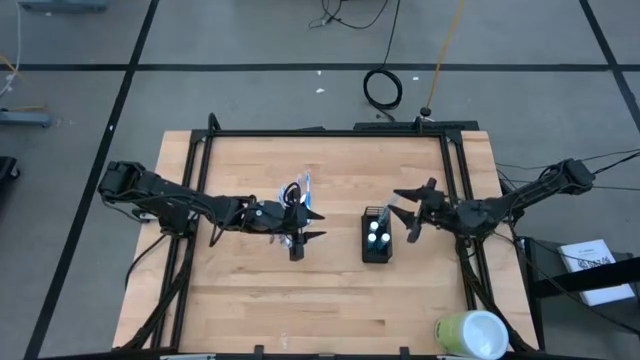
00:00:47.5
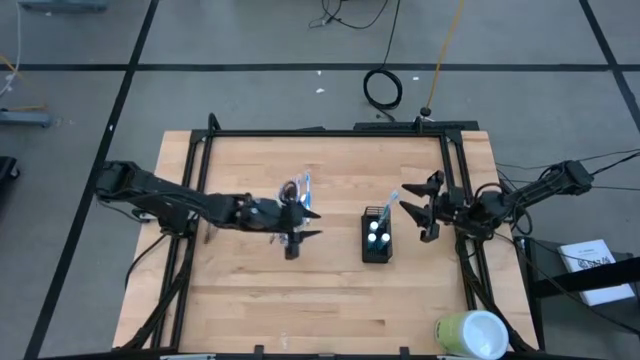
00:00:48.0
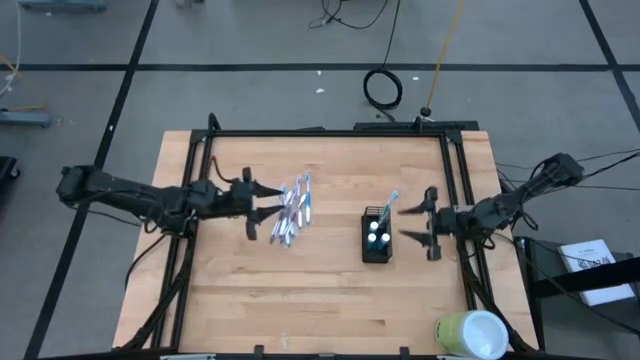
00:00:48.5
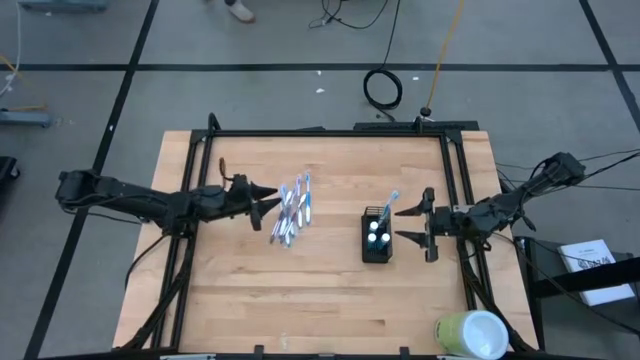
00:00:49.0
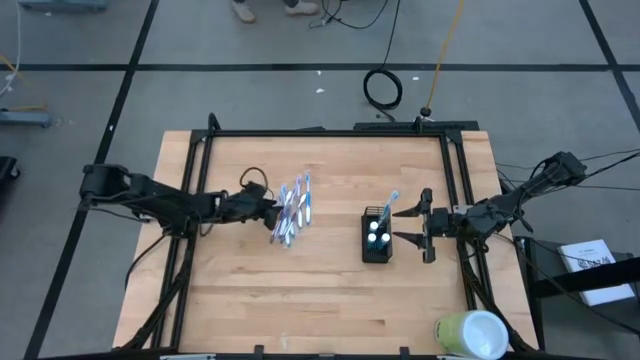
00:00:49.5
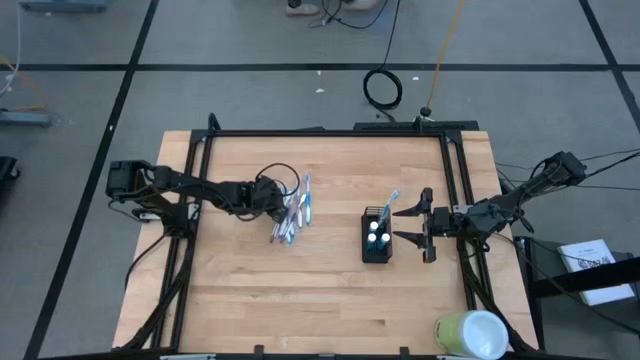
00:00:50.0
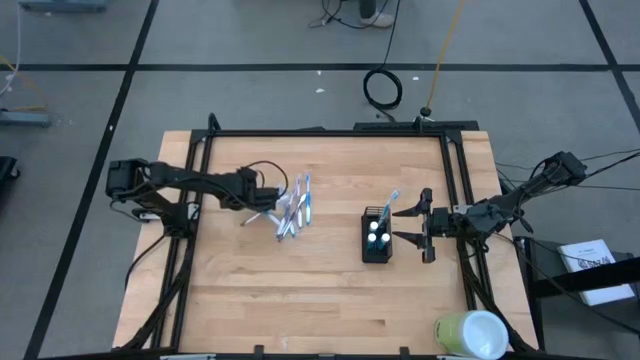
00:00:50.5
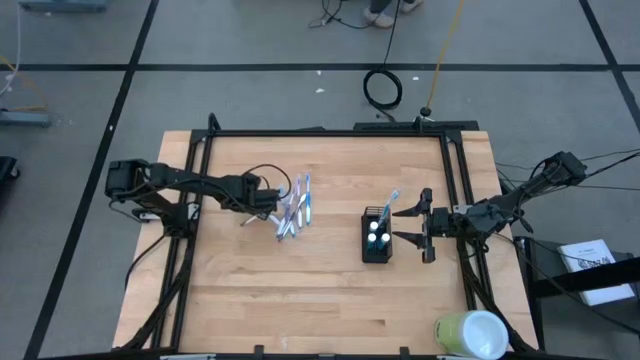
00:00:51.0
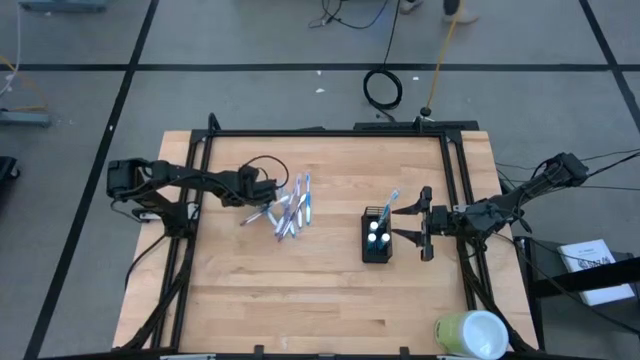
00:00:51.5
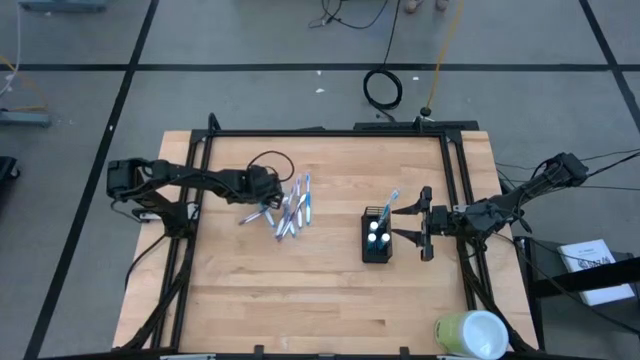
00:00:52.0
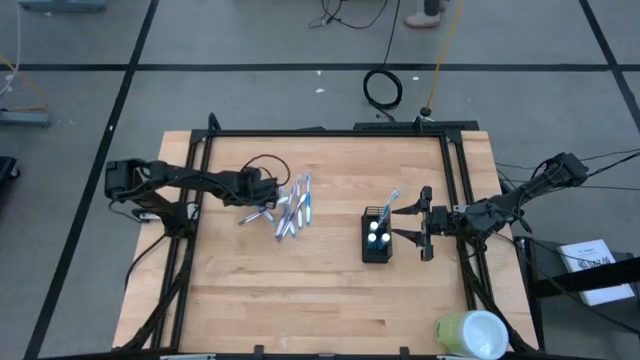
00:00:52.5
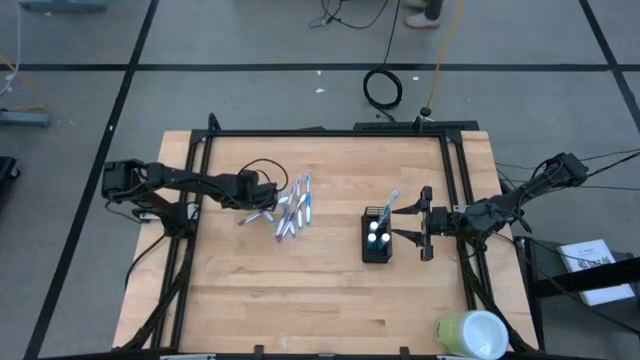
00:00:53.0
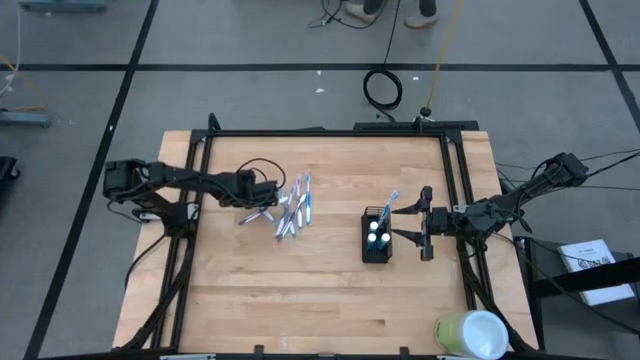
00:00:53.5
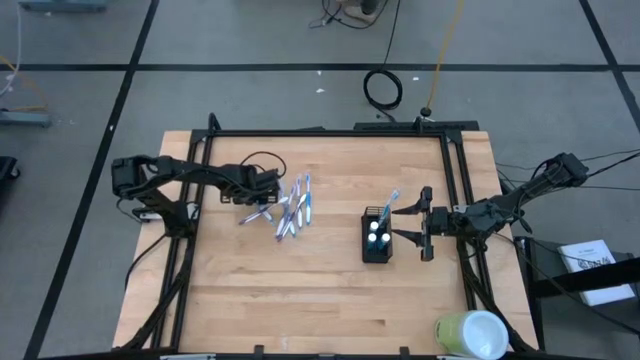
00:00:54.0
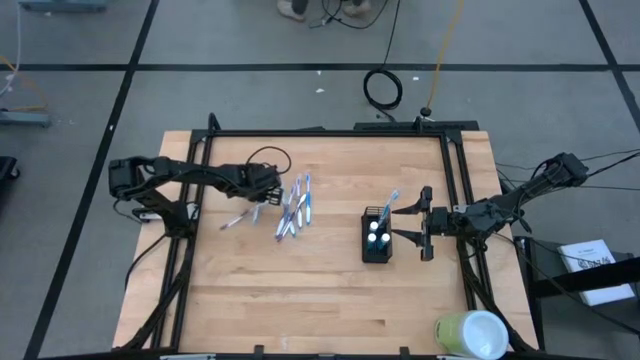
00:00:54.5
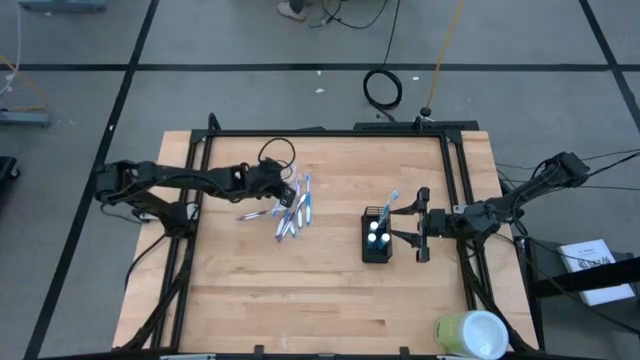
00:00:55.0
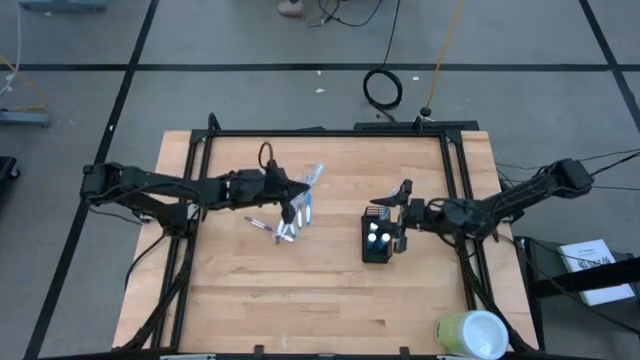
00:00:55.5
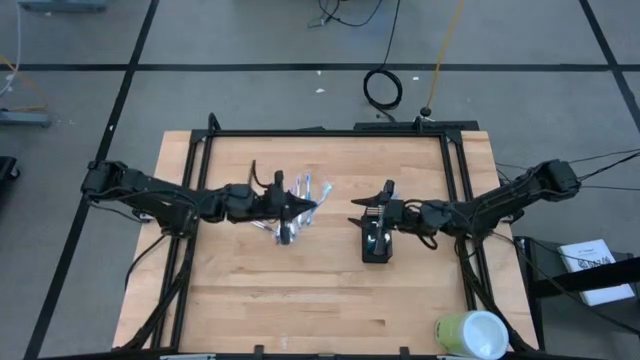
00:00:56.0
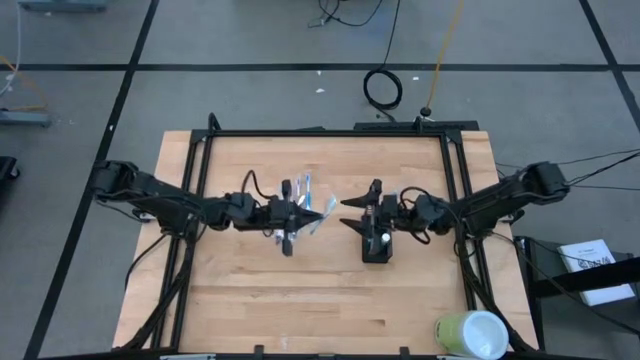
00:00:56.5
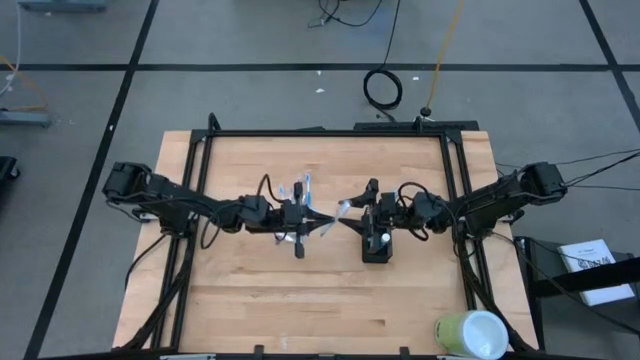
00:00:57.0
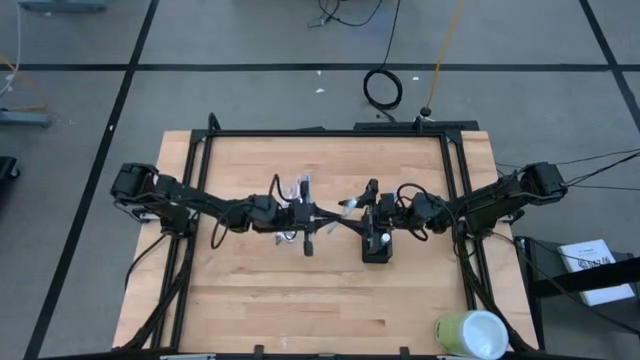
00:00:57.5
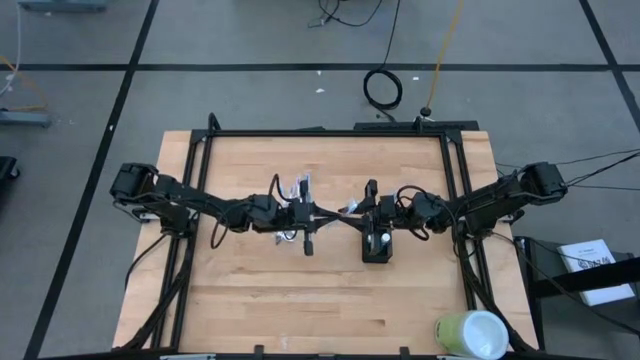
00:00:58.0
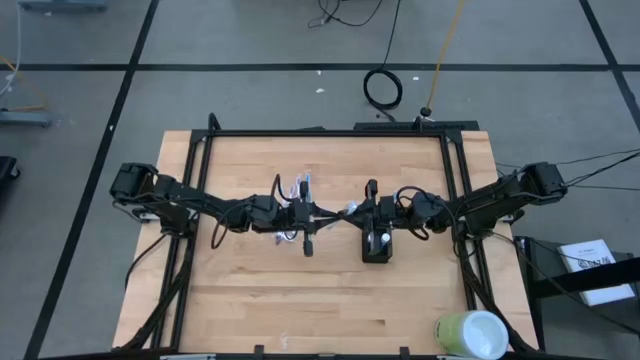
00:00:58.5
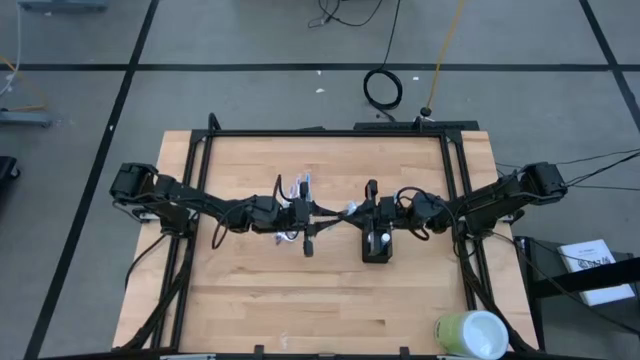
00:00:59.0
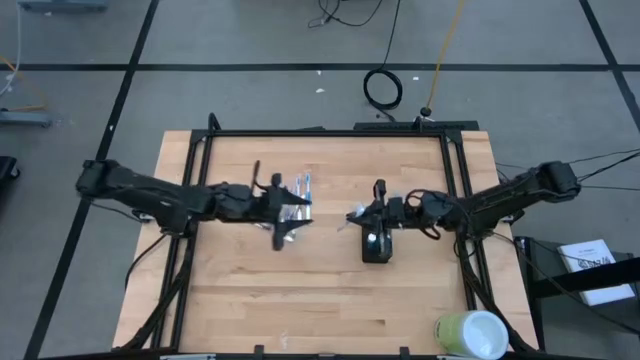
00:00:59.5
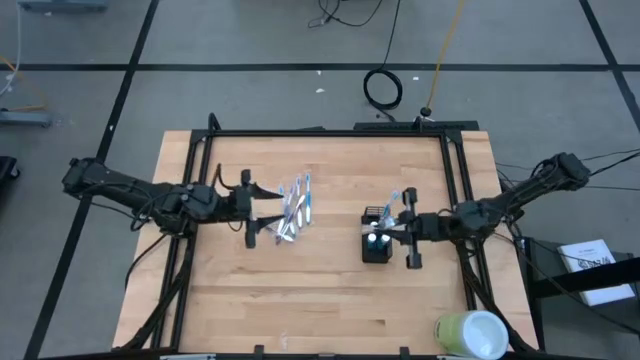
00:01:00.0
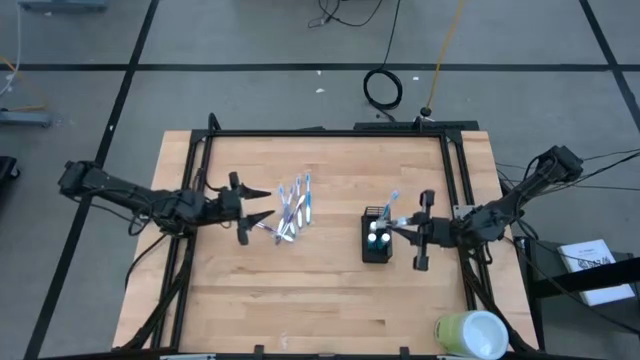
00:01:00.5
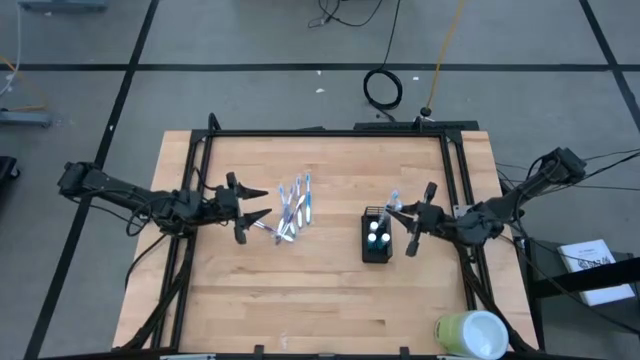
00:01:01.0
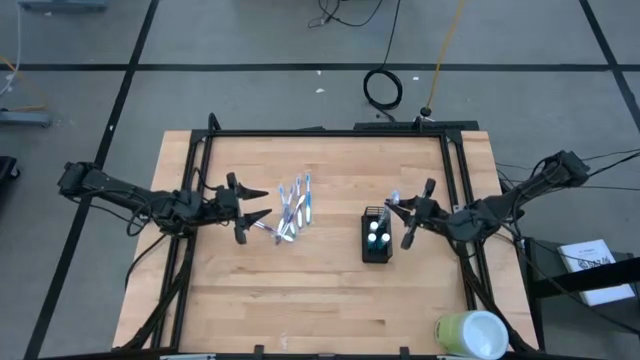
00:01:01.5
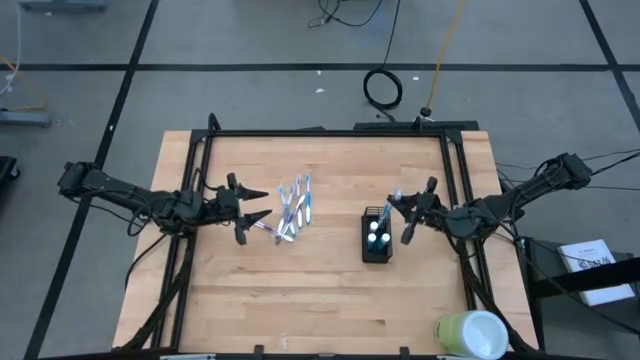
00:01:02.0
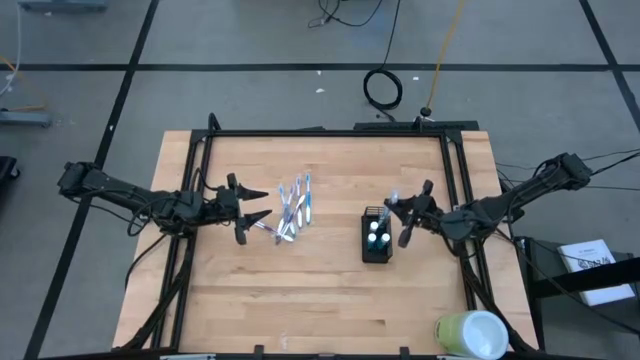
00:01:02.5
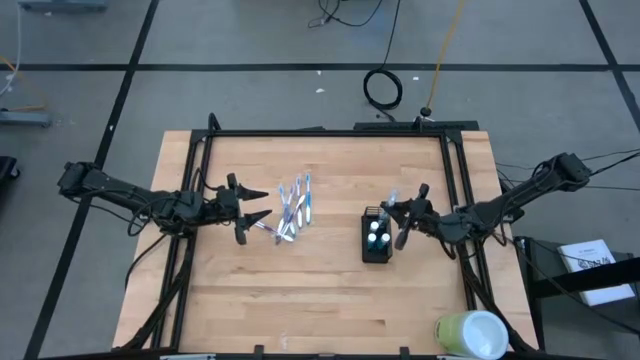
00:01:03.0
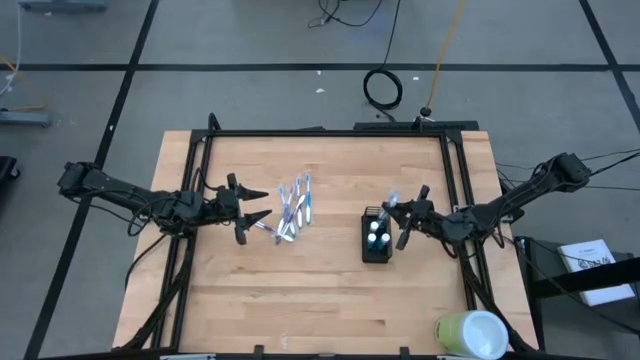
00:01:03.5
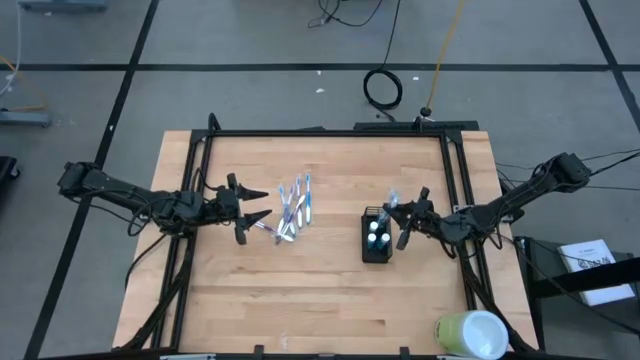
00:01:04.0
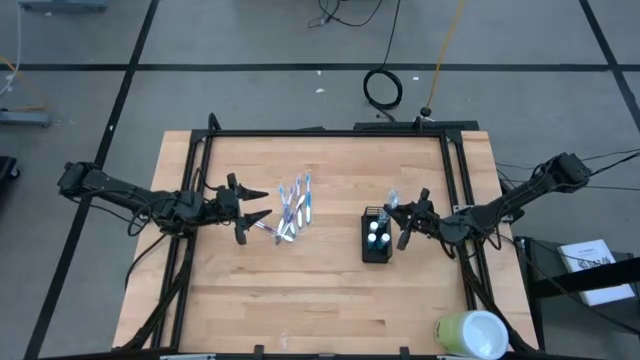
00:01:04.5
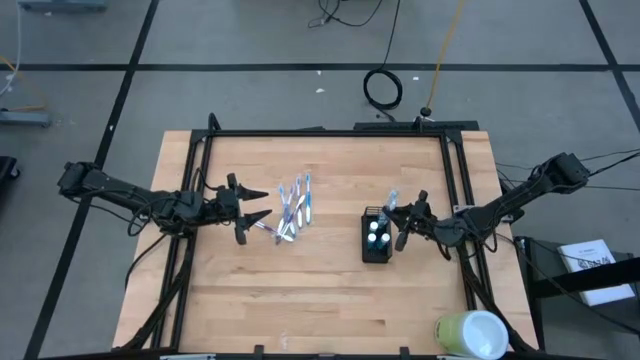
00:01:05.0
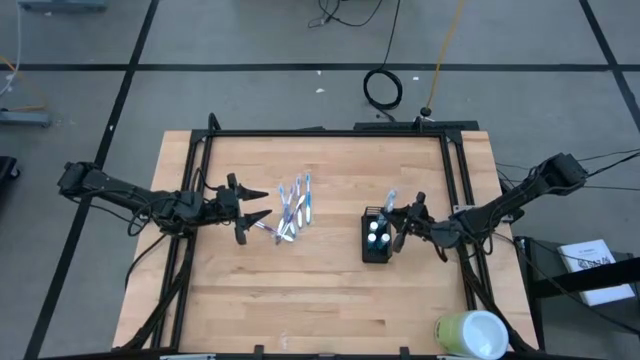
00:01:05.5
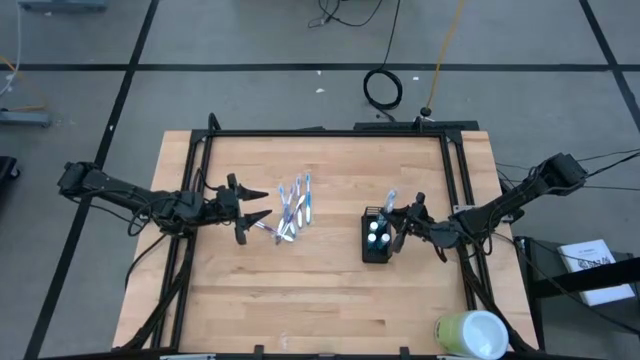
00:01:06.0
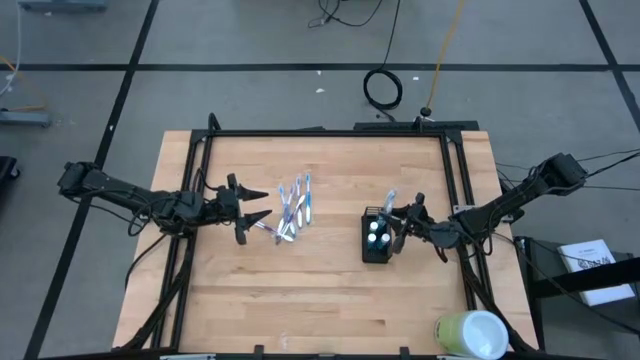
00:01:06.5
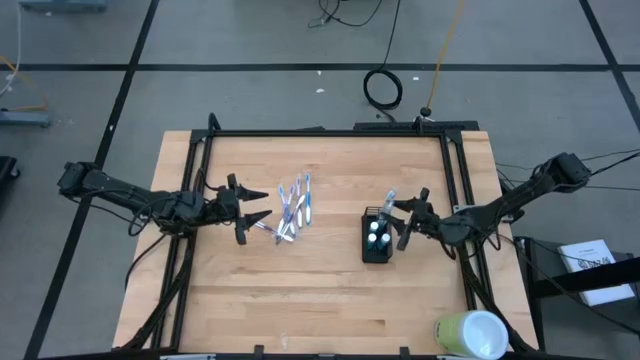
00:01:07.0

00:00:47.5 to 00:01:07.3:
Task: Pick & Place toothbrushing station
Put the blue toothbrush into the black organizer
